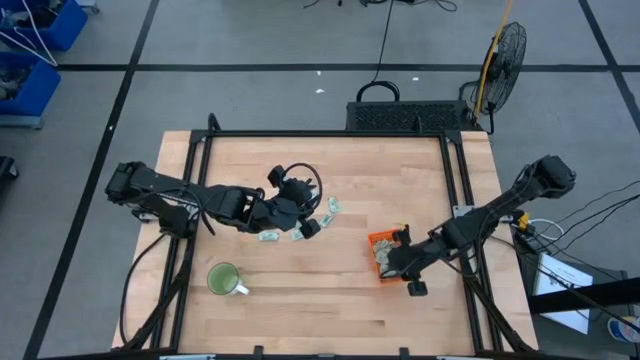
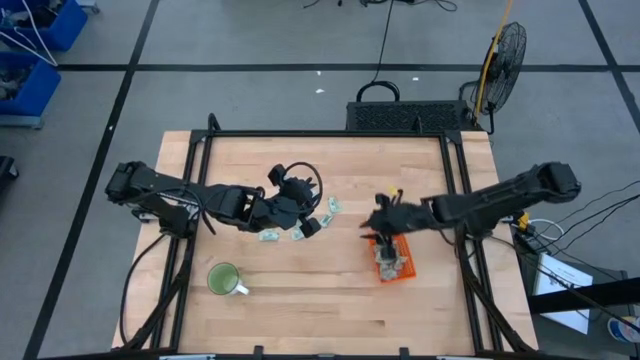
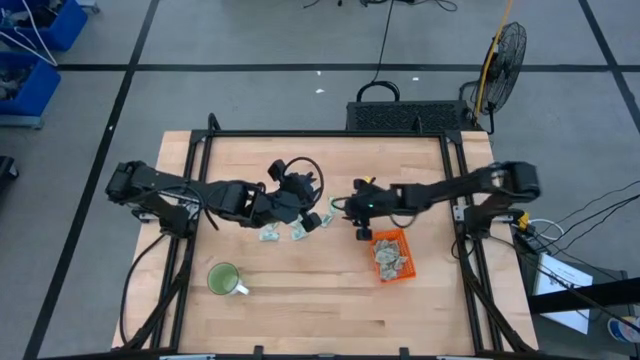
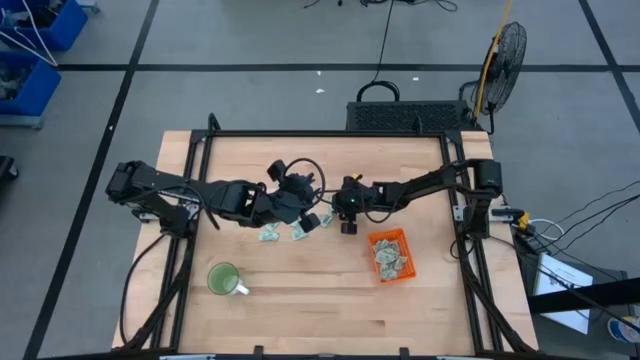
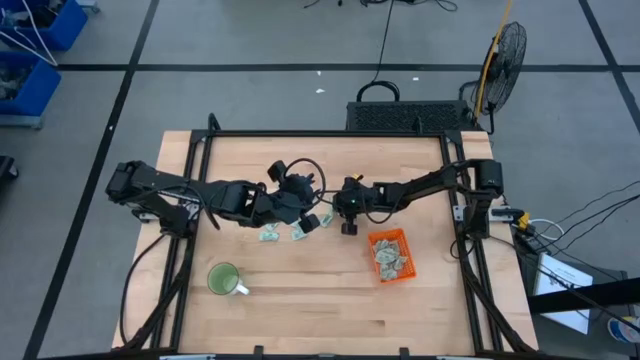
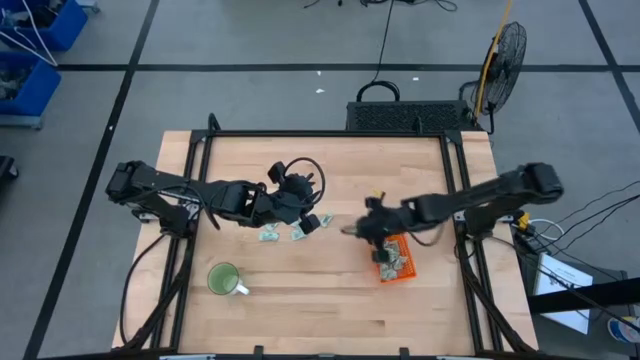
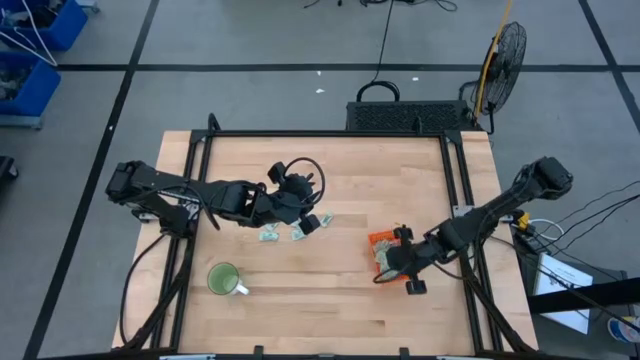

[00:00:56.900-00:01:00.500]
Task: Pick and place Stevia / Truvia into bins
Put the stevia packet into the orange basket

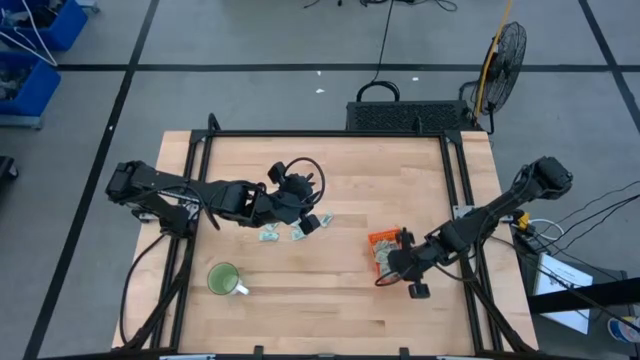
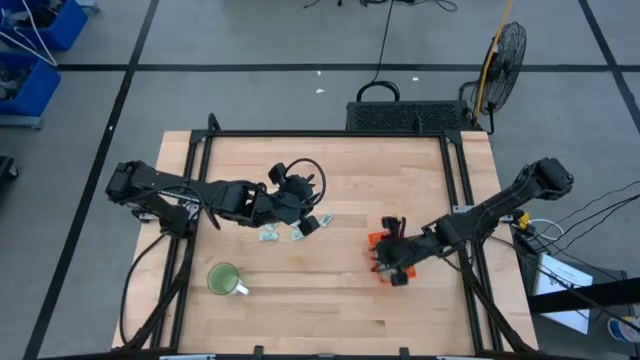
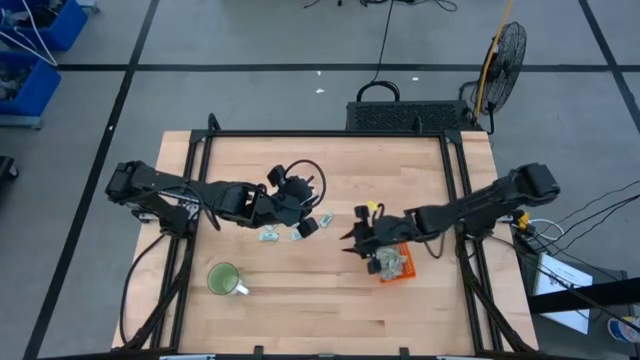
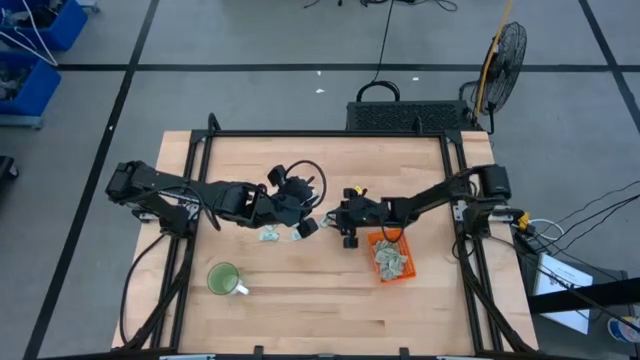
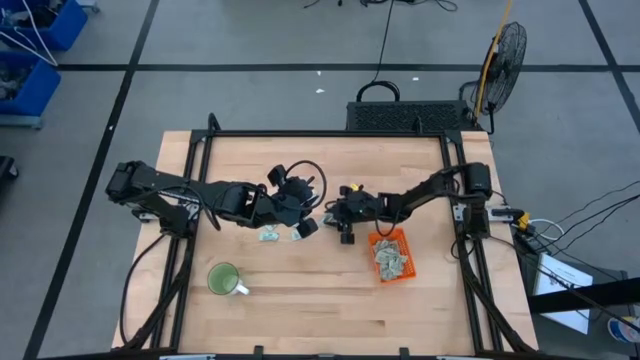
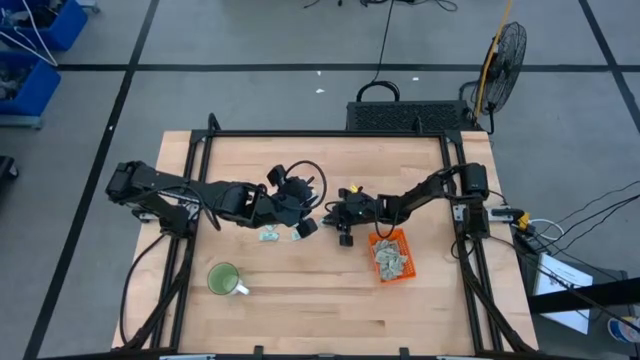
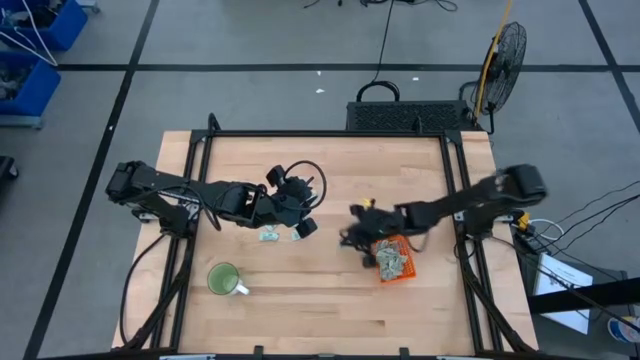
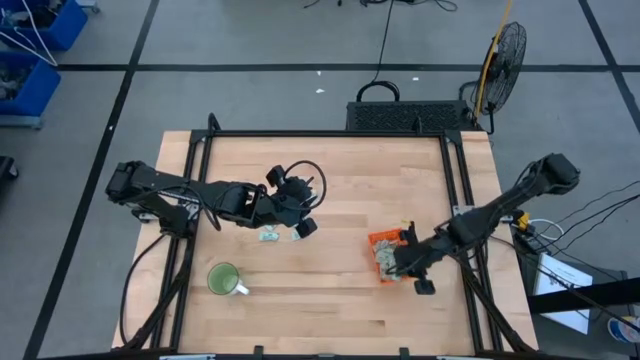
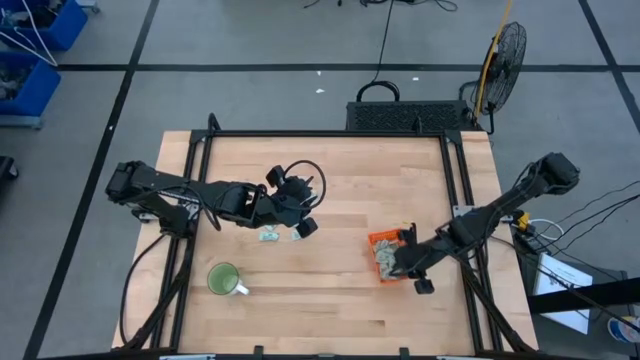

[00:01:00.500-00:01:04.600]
Put the stevia packet into the orange basket

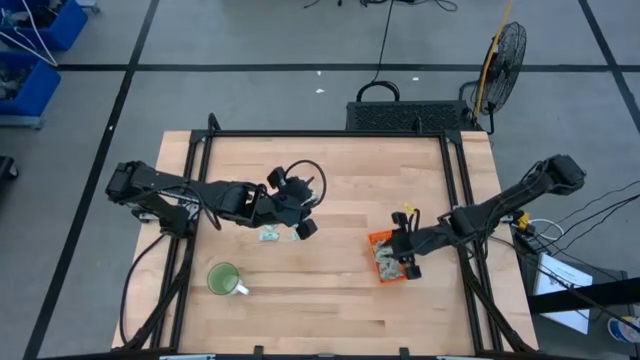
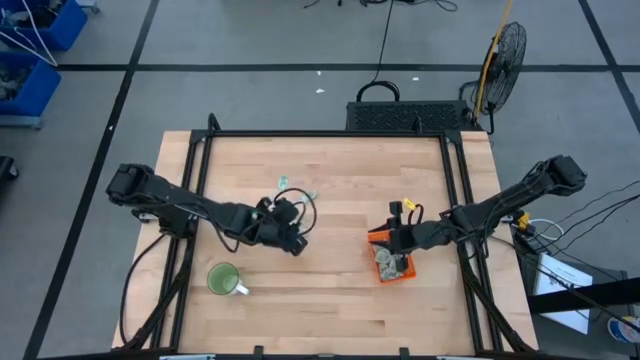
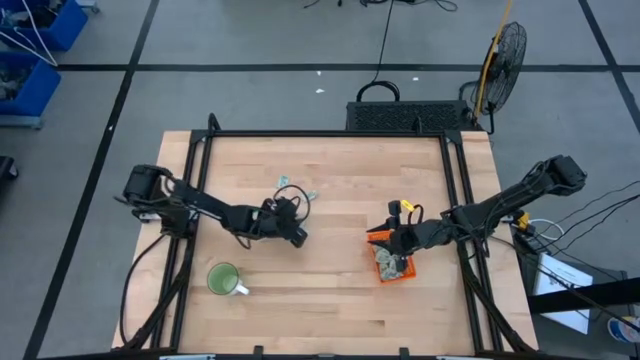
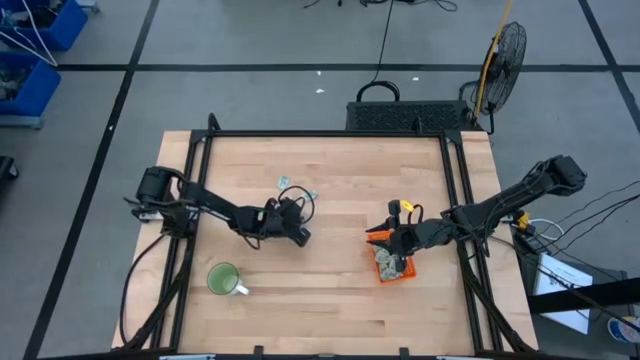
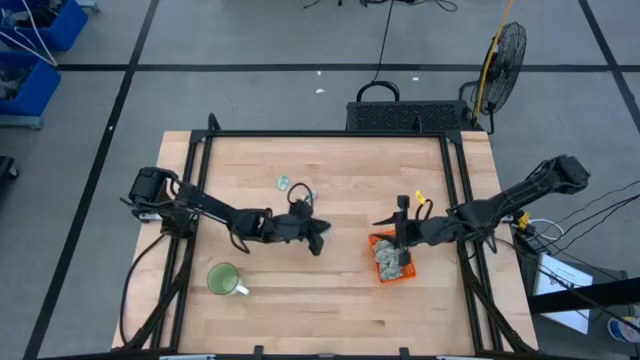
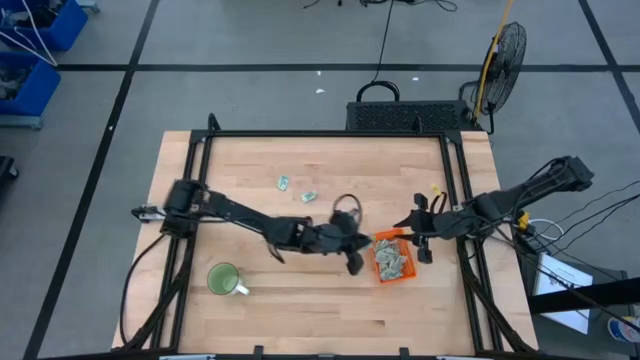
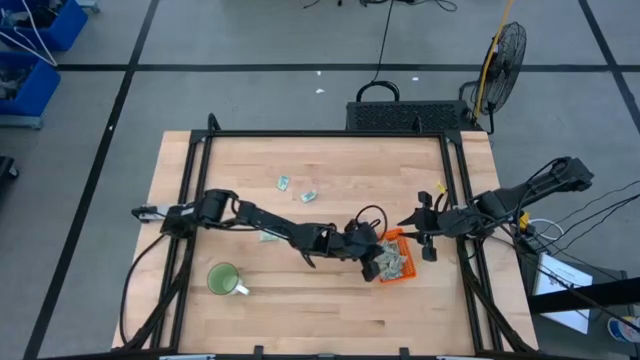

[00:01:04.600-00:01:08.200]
Put the stevia packet into the orange basket

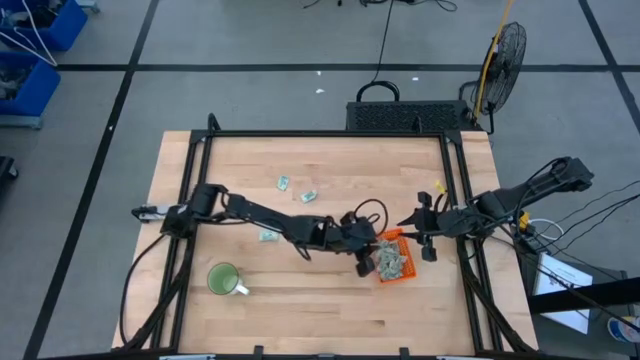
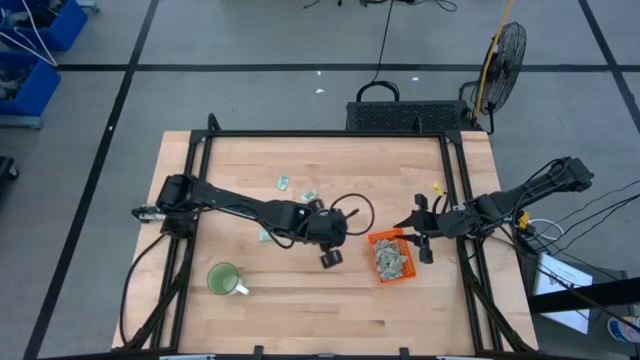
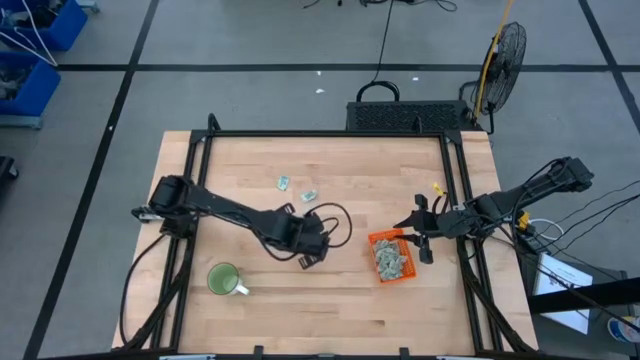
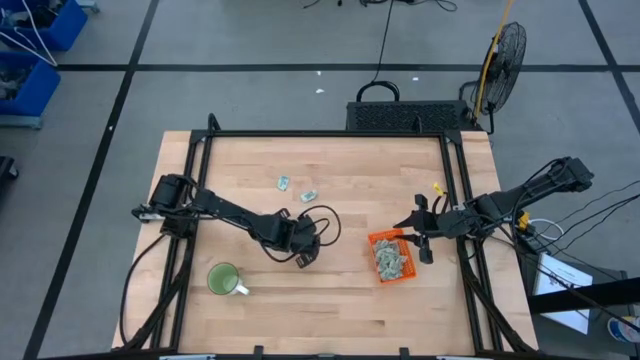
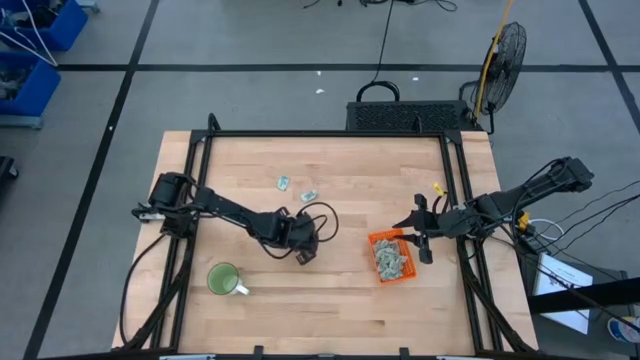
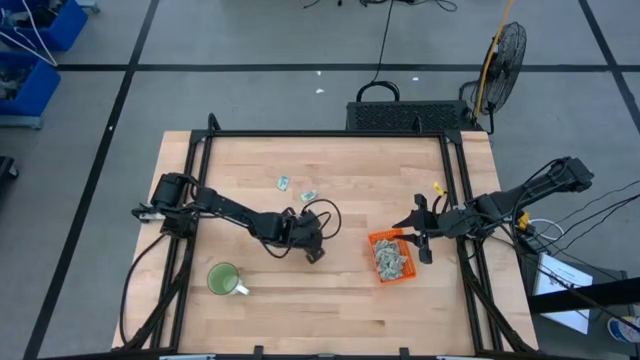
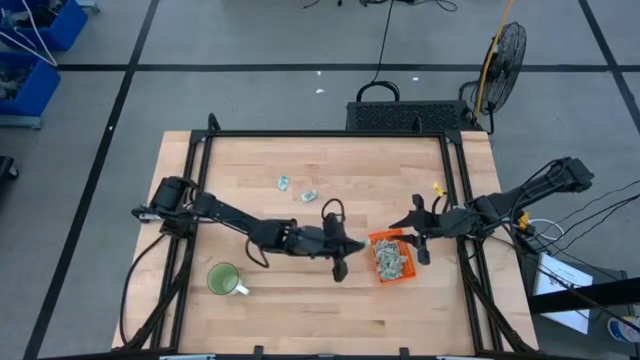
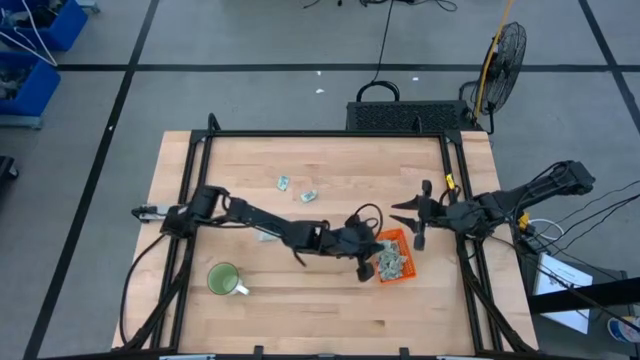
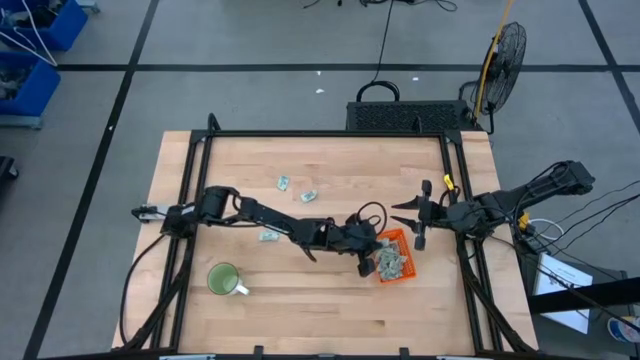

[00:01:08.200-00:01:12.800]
Put the stevia packet into the orange basket

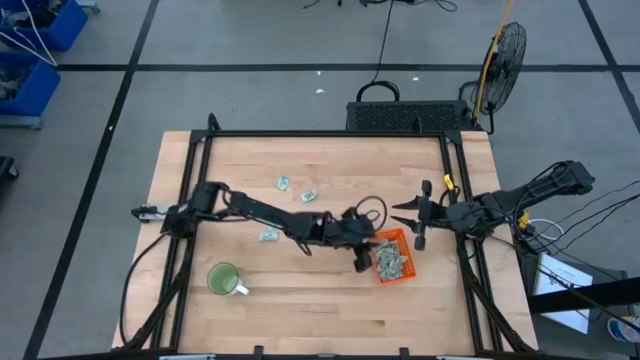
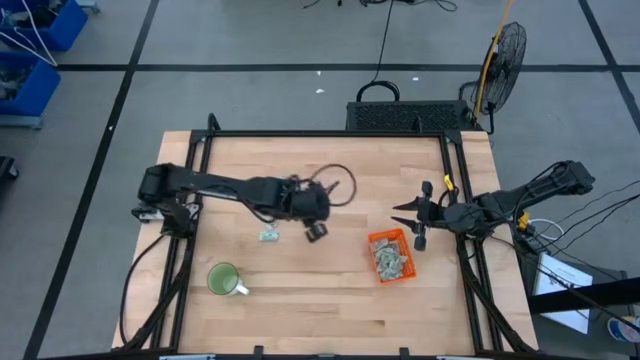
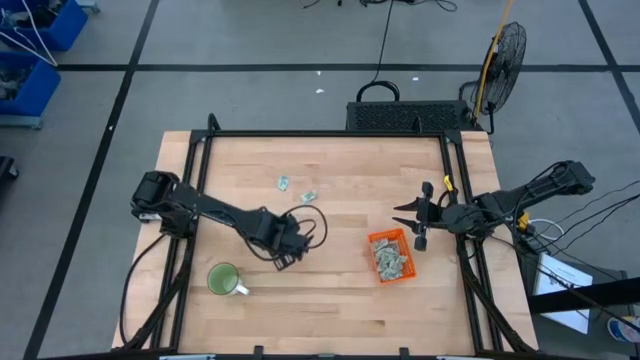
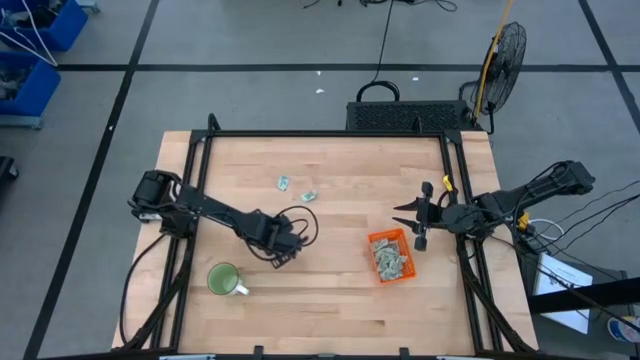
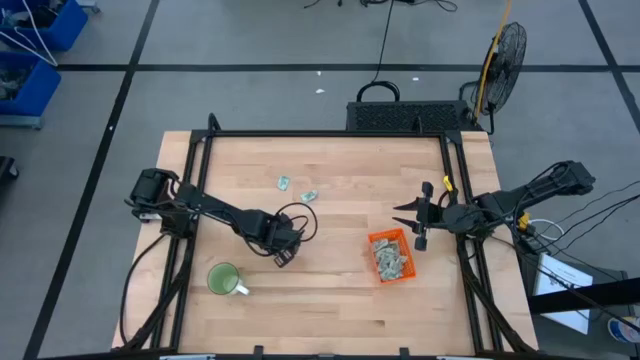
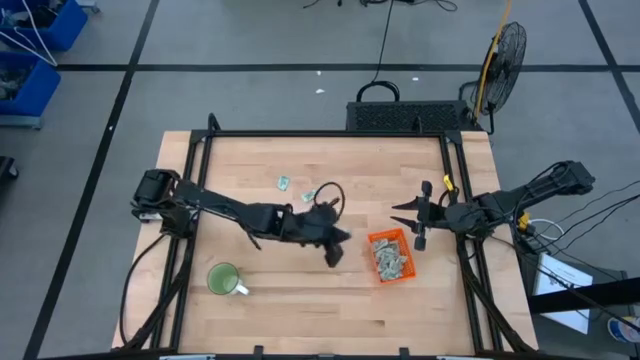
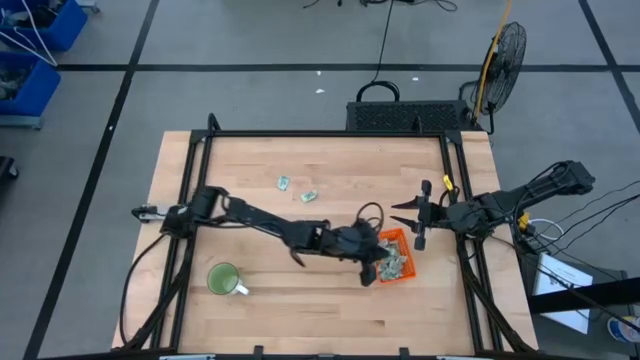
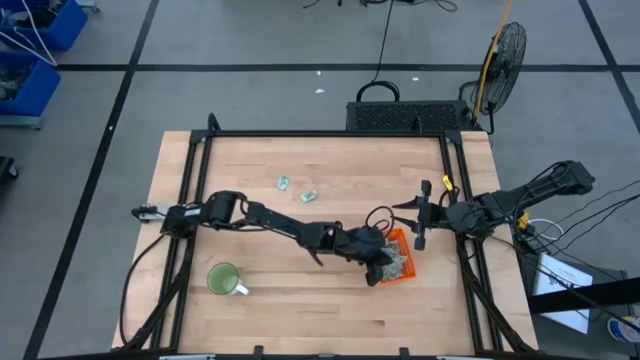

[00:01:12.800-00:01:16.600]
Put the stevia packet into the orange basket
